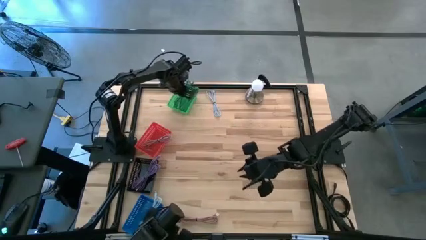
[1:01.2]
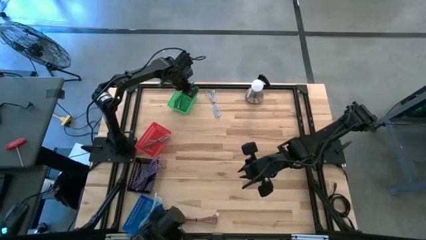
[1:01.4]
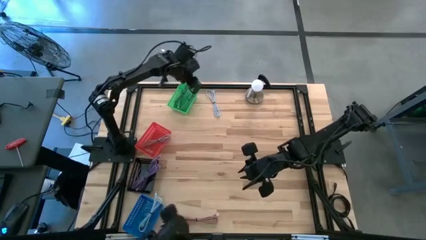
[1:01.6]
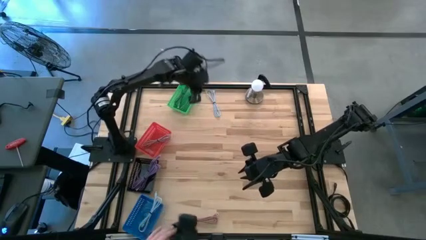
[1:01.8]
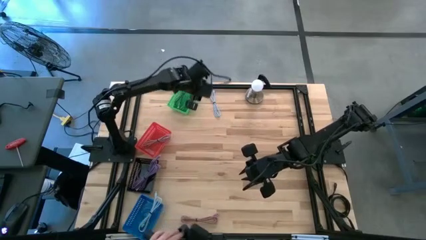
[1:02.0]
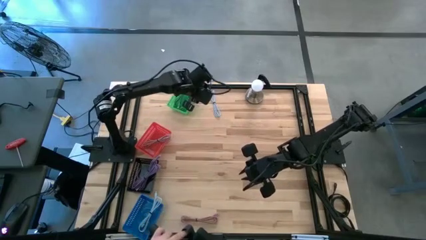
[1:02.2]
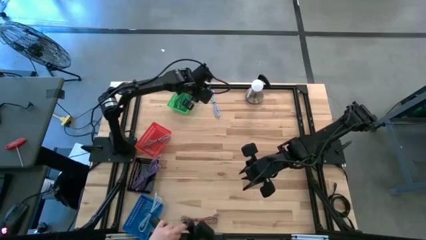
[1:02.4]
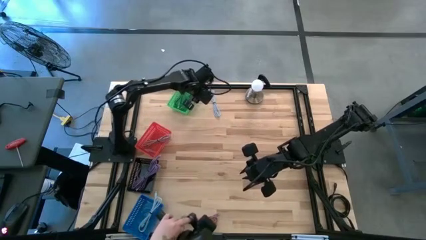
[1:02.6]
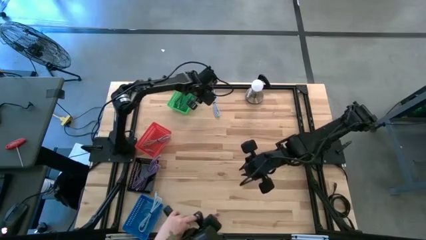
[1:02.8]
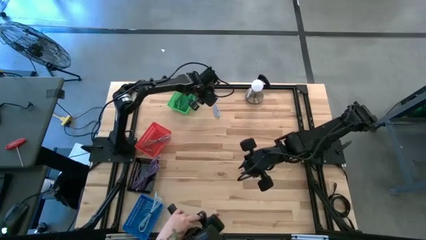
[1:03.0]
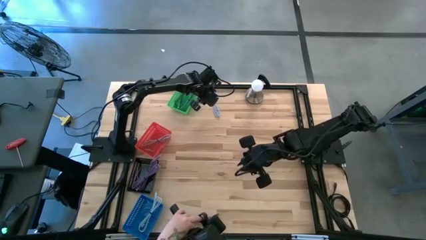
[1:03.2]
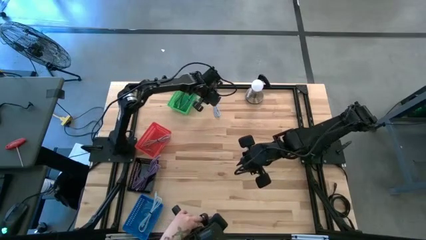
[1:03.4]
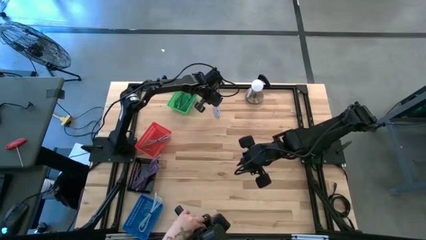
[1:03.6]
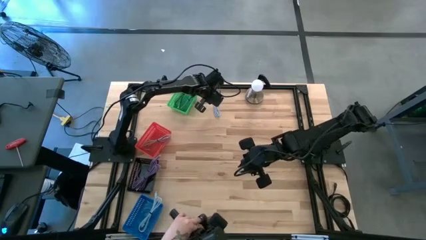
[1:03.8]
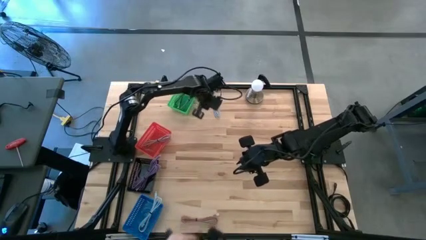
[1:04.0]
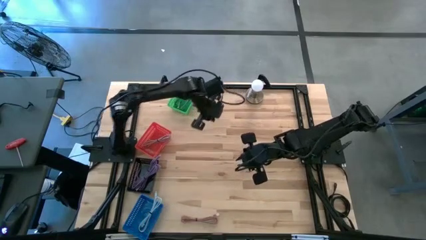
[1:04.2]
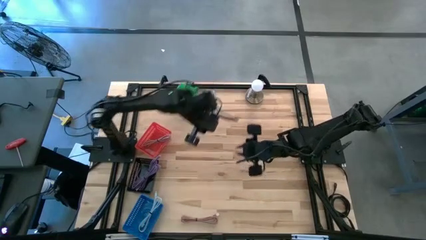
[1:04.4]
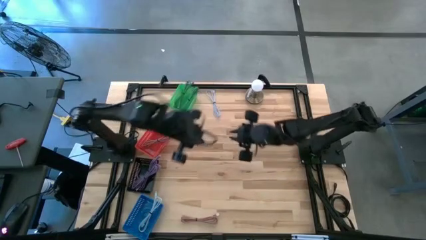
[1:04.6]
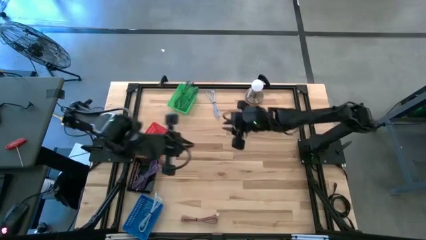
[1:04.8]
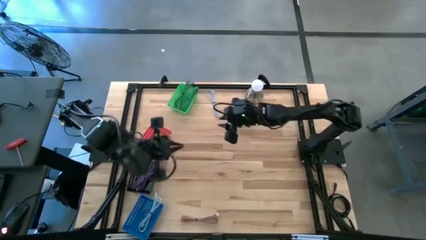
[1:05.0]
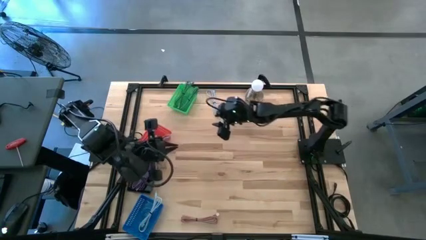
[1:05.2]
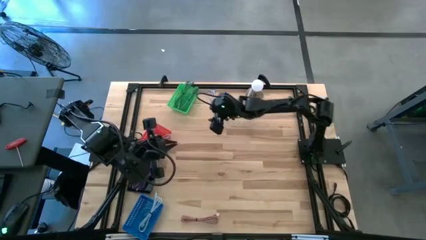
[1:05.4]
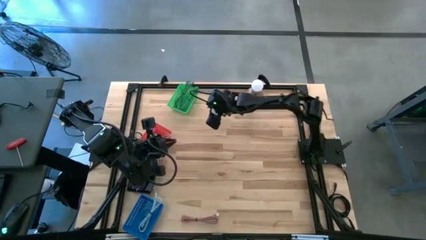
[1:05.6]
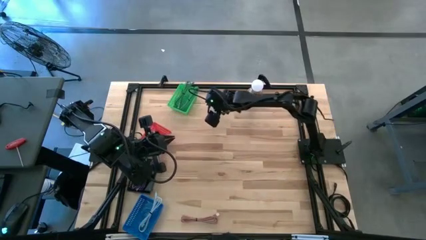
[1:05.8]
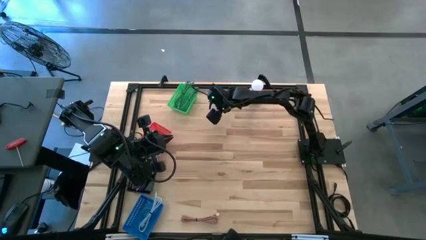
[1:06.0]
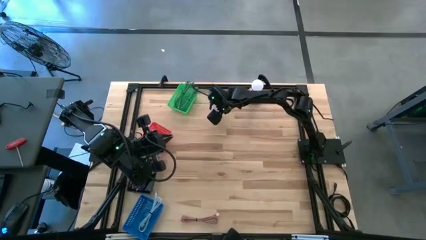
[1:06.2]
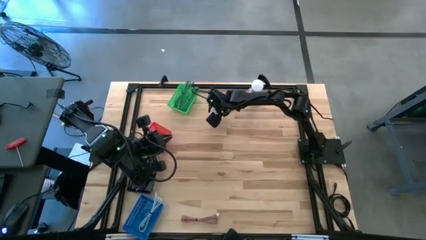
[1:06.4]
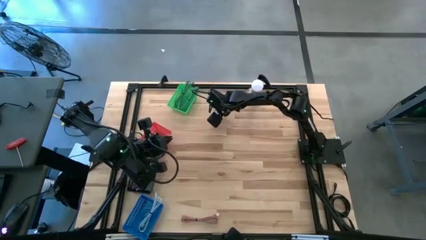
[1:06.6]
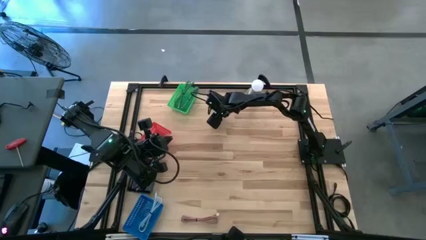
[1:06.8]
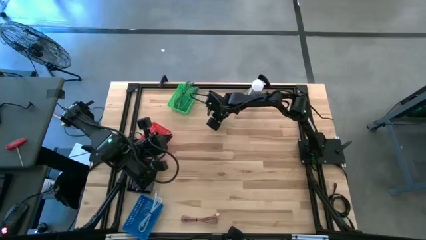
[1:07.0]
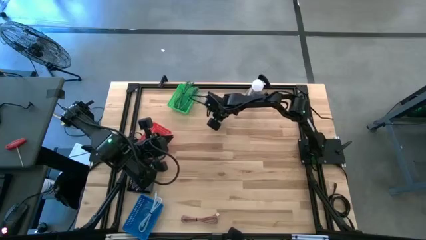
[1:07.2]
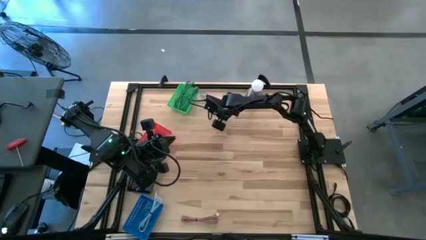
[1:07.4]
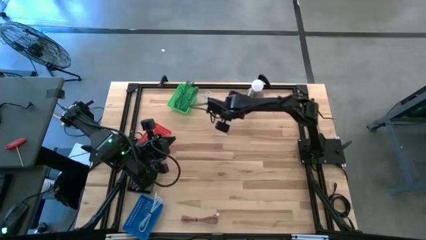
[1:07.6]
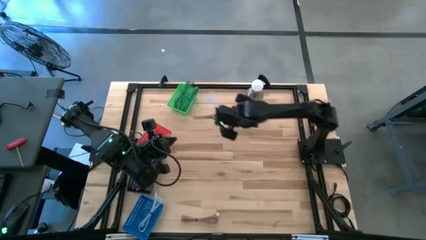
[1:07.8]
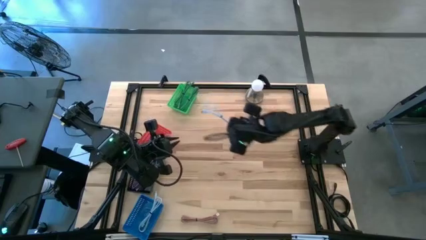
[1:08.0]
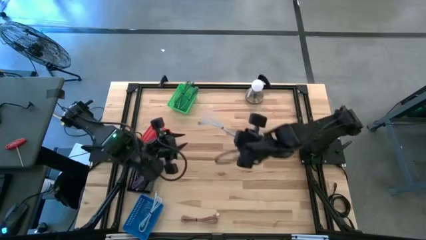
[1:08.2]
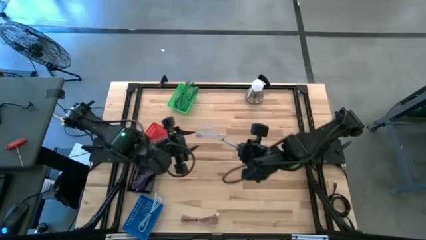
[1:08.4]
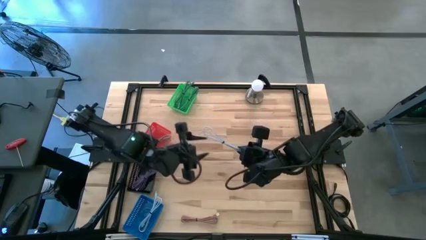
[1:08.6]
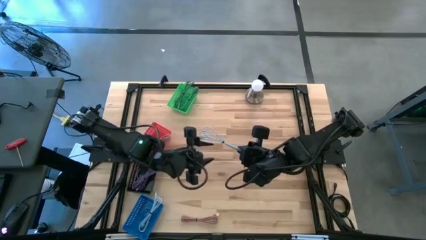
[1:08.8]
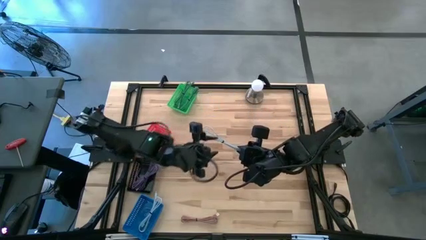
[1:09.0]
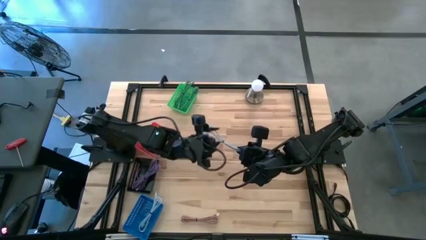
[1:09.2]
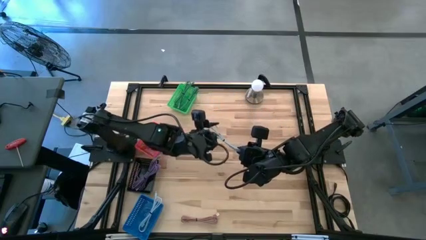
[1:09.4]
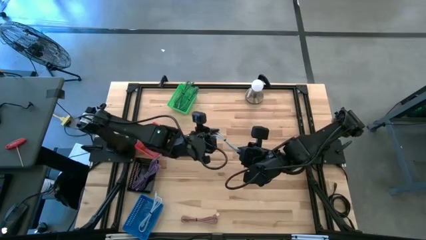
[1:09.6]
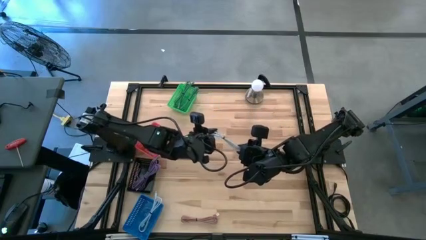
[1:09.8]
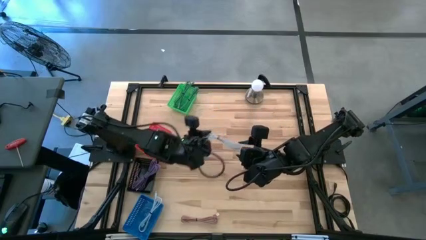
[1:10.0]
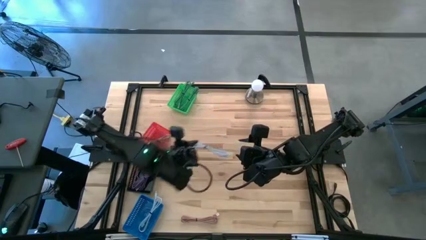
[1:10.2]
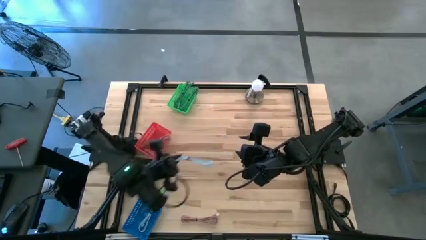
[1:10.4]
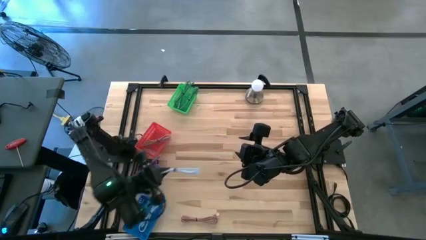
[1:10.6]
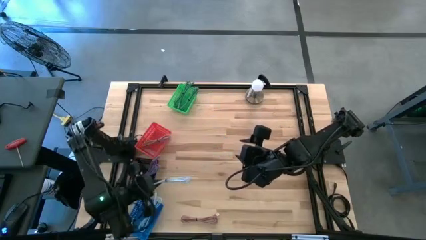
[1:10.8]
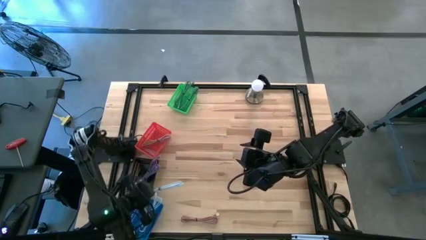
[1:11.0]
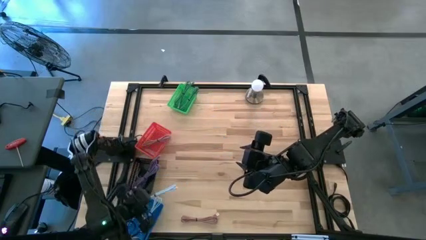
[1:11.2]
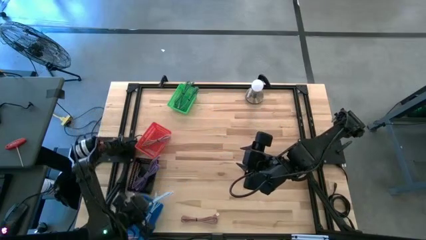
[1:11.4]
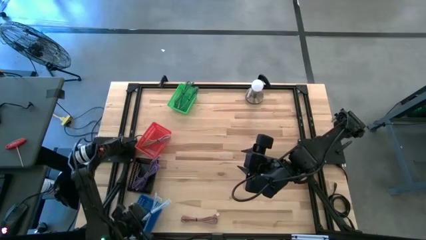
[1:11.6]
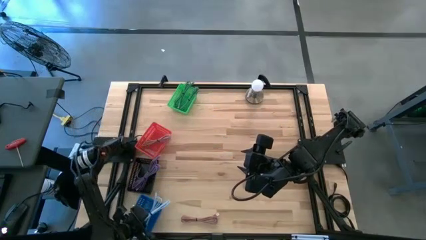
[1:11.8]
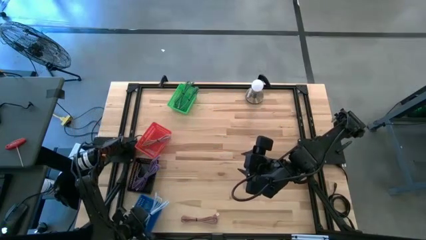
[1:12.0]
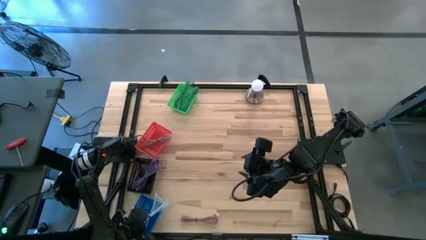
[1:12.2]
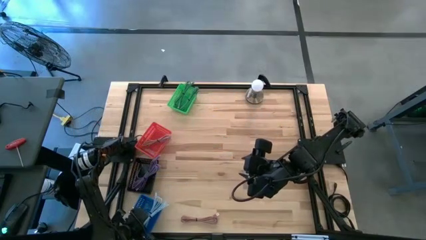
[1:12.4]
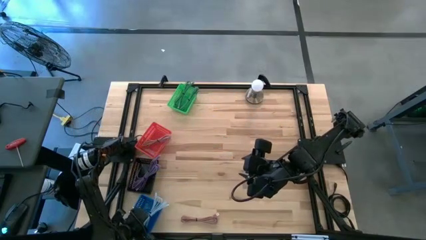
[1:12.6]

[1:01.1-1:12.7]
Task: Pick & Place USB Port
Put the light blue charger cable into the blue bin

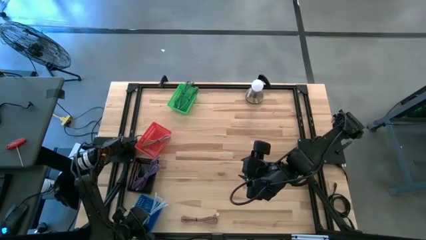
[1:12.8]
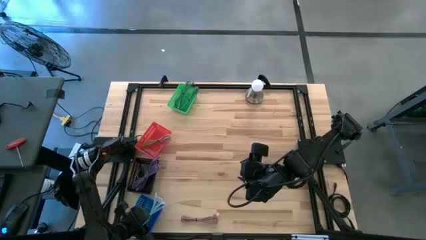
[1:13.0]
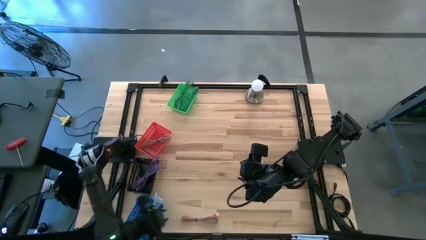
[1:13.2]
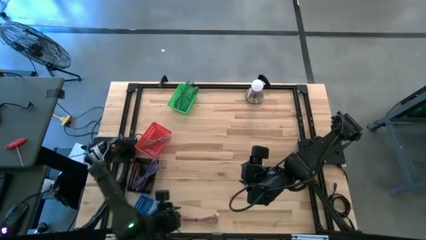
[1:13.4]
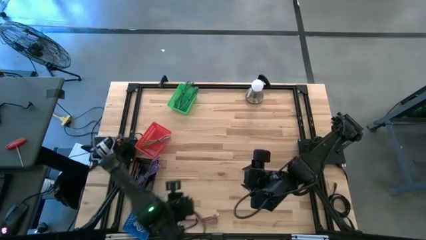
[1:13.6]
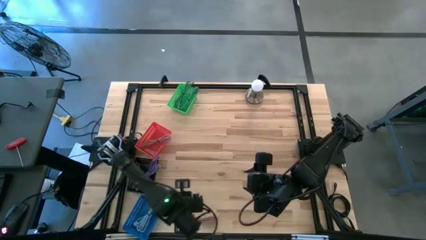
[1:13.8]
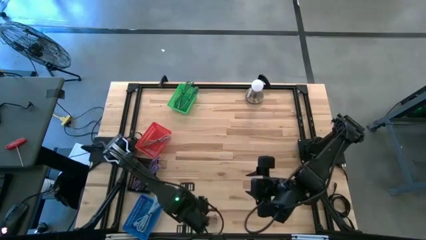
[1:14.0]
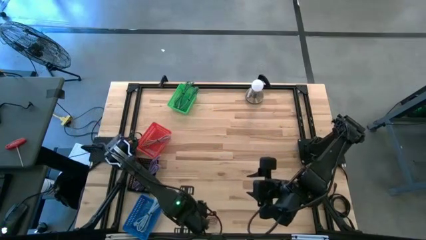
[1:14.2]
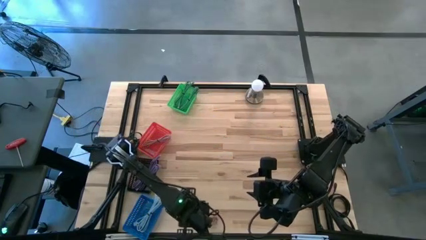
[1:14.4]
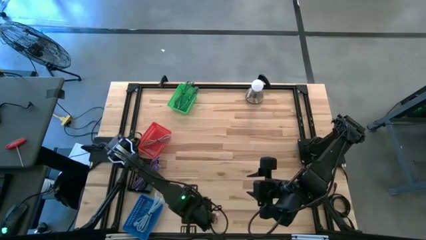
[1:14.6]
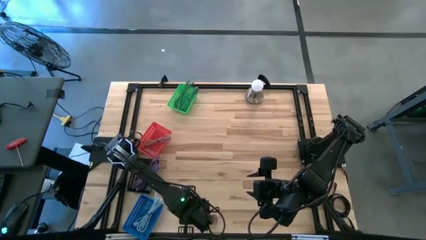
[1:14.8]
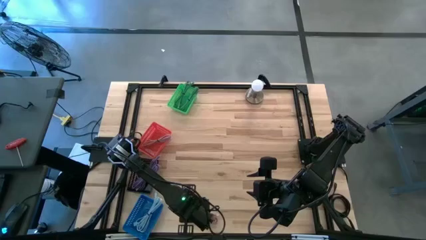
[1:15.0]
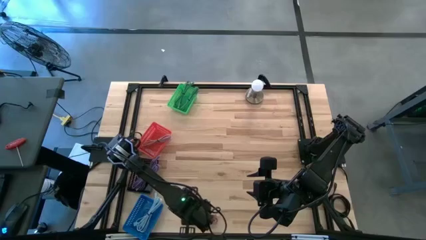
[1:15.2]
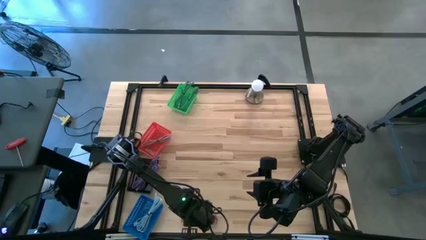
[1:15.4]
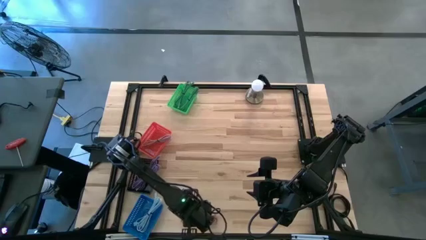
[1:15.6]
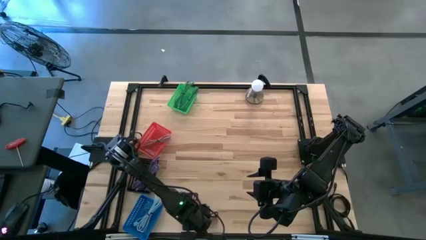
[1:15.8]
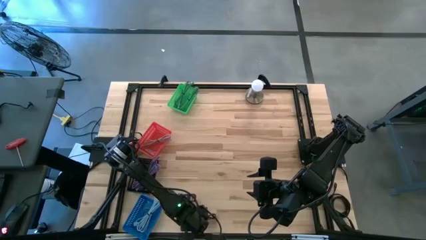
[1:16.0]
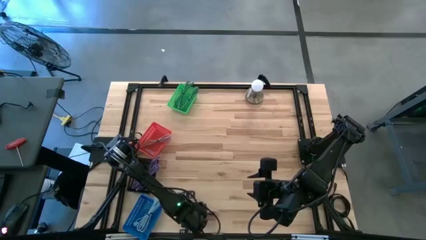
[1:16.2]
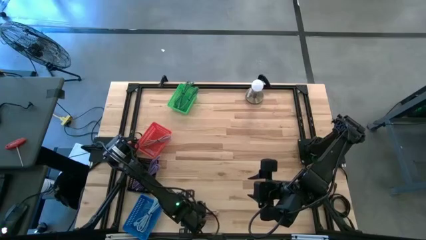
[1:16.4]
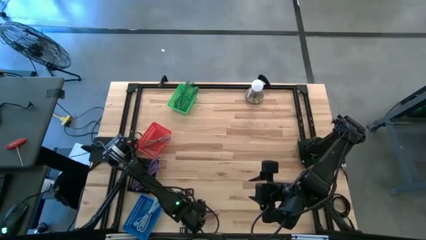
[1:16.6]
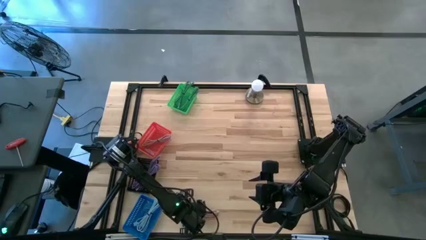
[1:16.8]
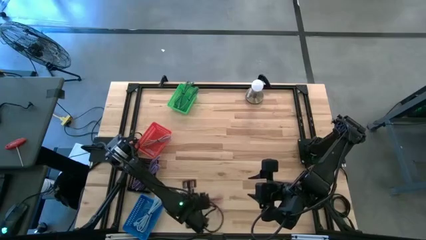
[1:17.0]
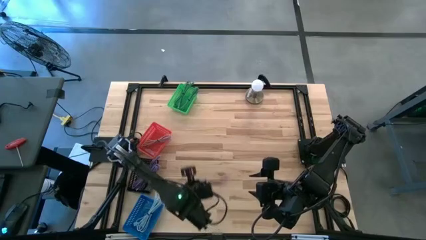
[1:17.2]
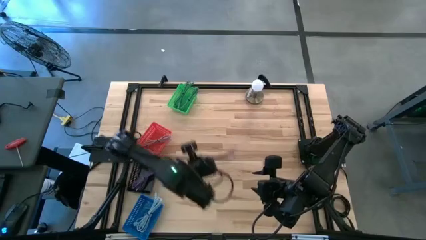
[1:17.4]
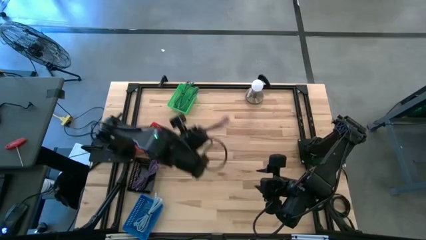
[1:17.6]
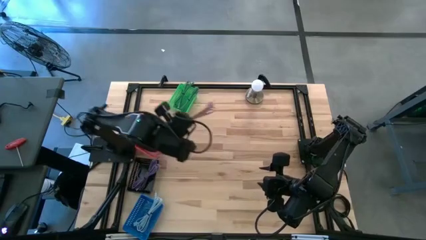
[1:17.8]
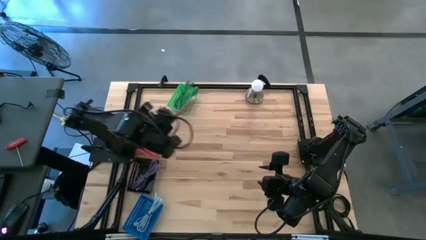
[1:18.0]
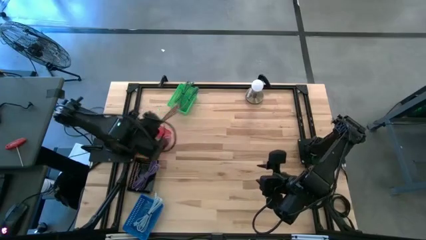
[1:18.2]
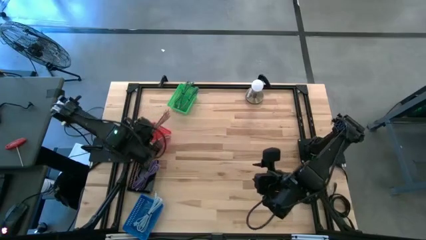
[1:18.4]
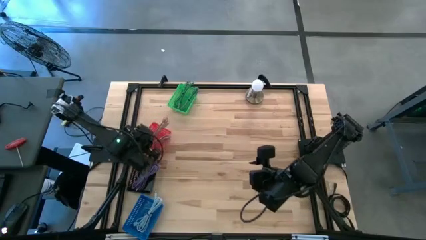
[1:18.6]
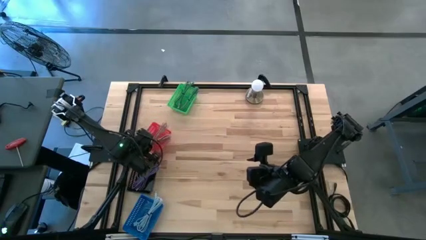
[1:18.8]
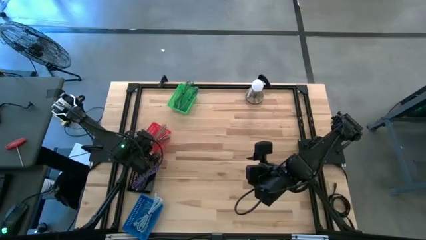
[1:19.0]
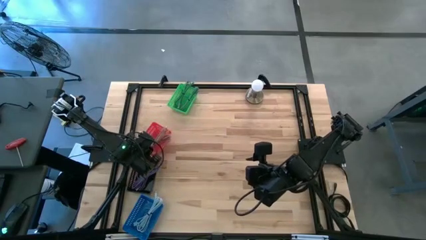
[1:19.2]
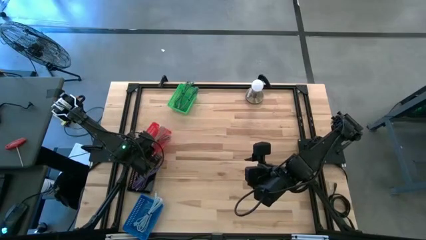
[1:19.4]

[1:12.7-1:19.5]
Put the pink charger cable into the red bin
